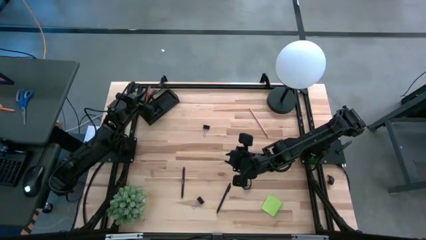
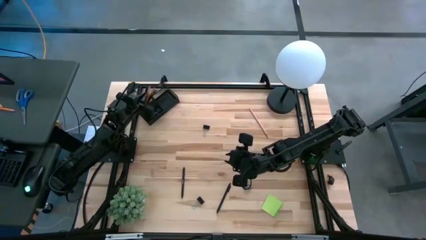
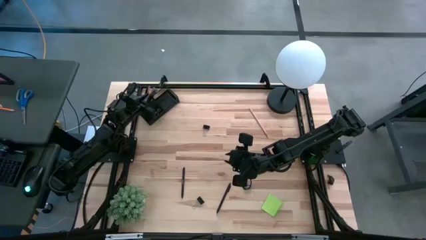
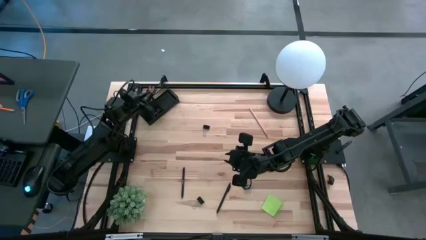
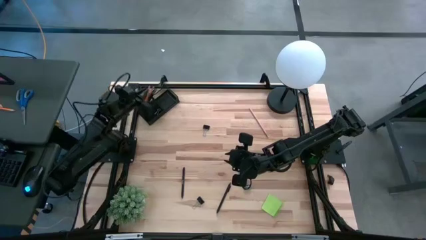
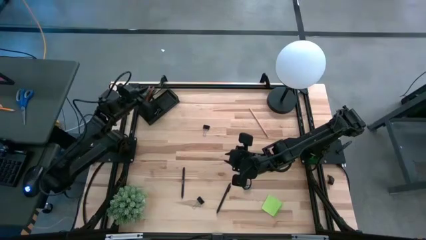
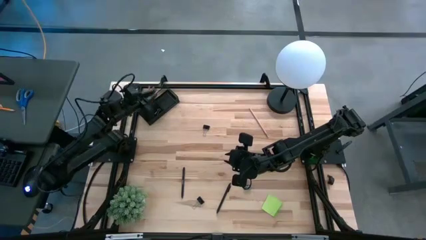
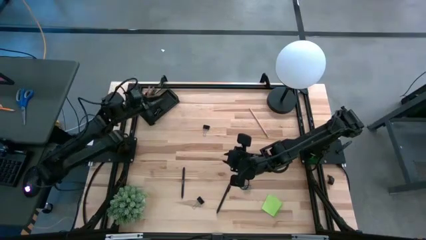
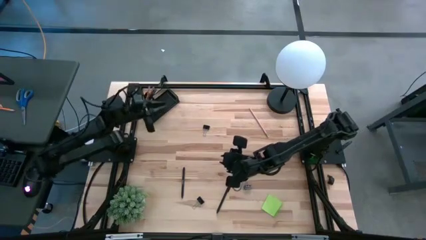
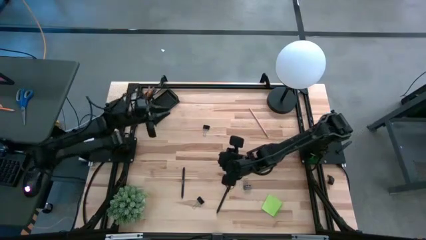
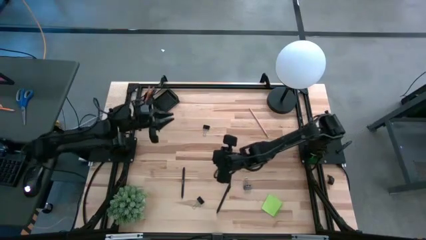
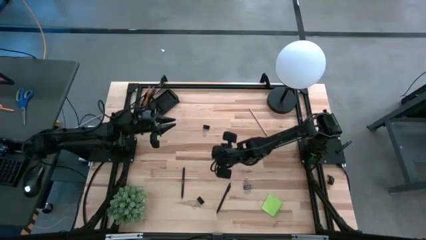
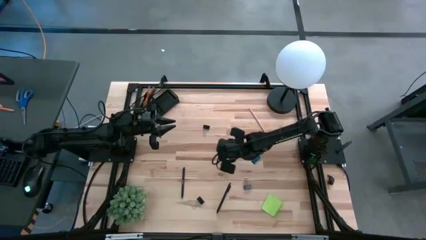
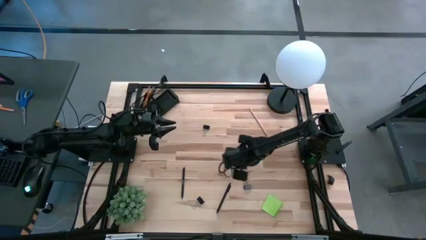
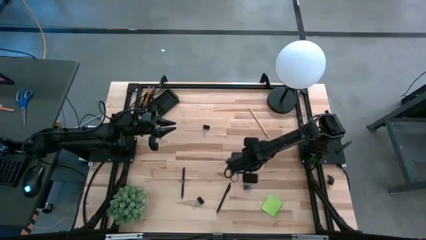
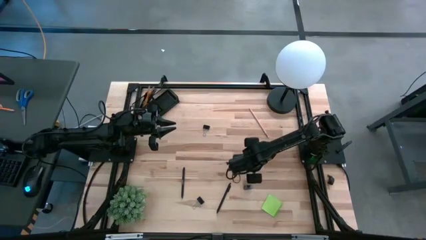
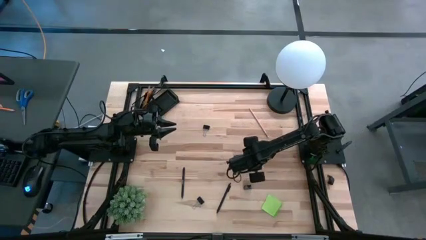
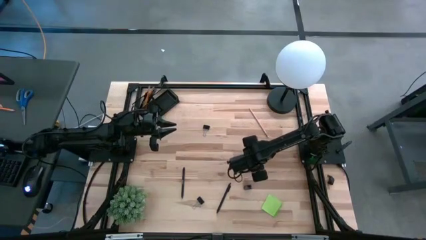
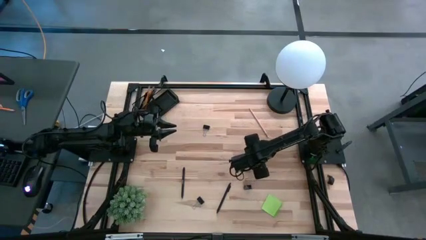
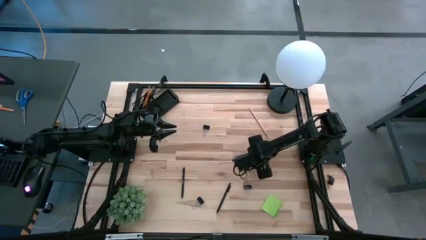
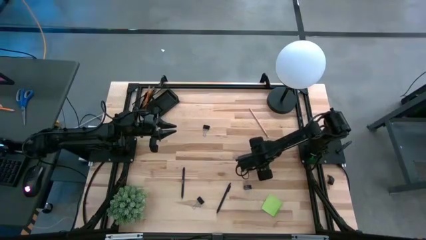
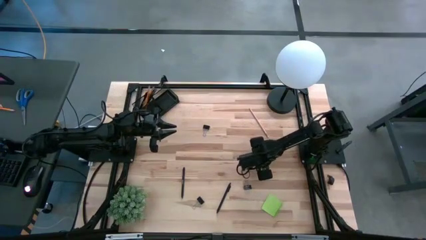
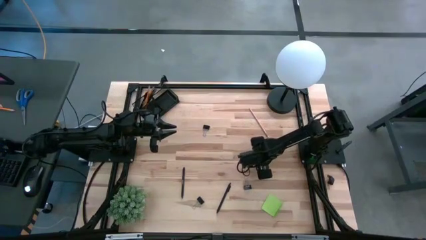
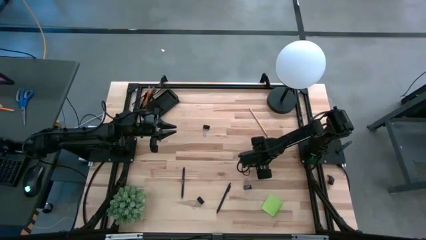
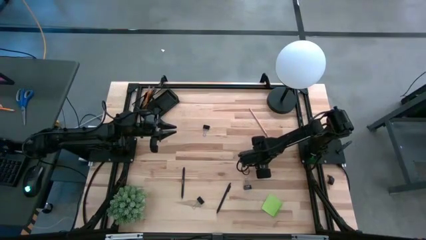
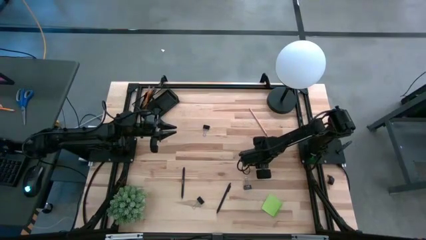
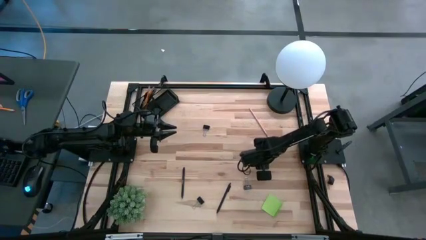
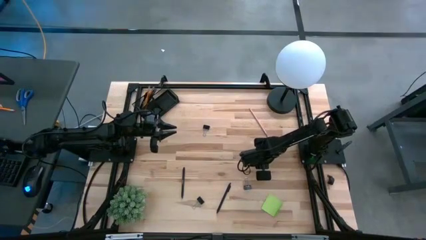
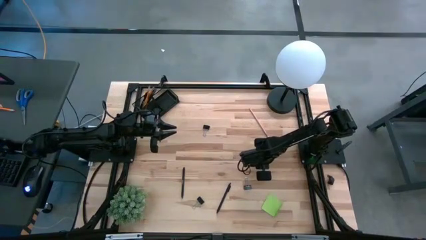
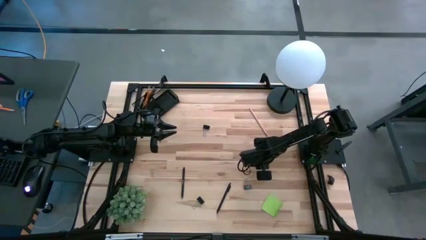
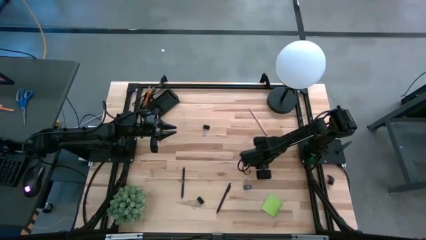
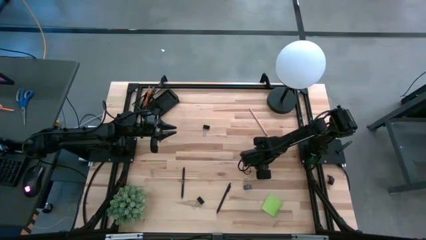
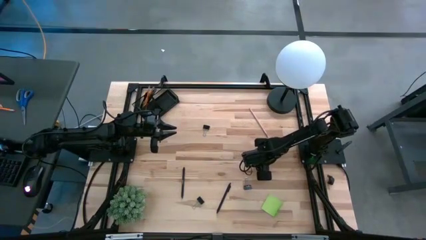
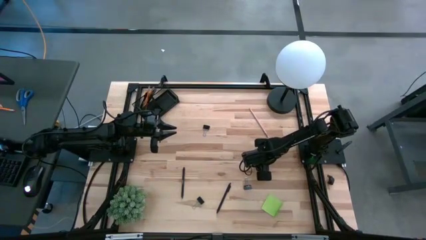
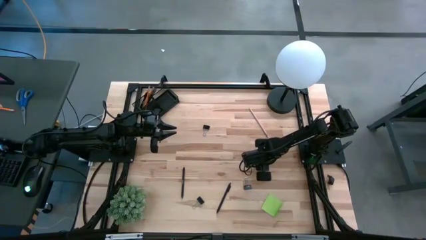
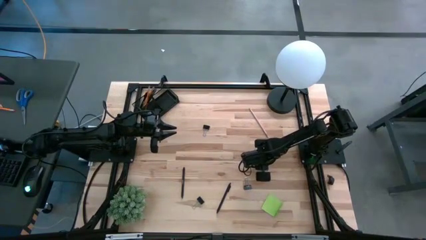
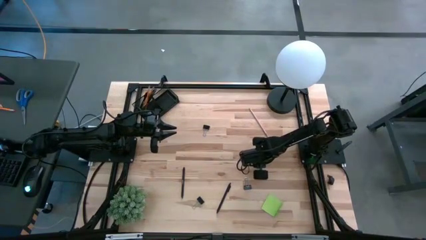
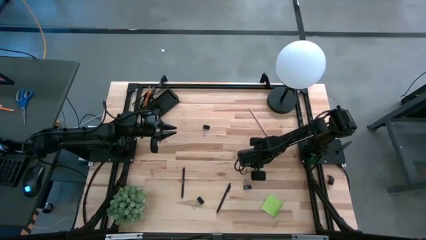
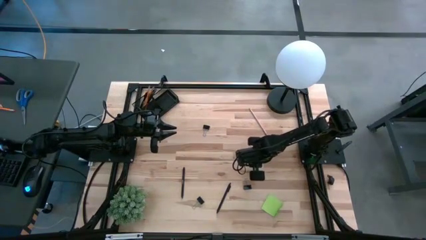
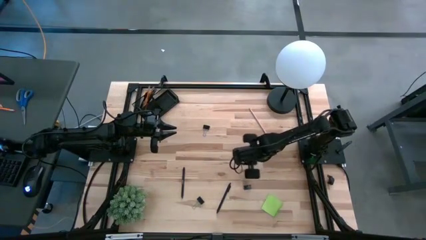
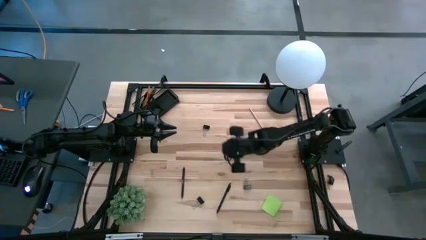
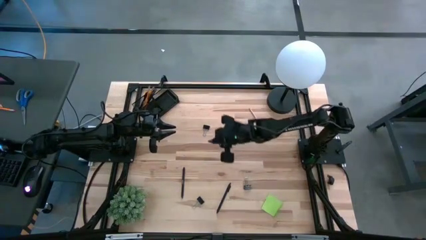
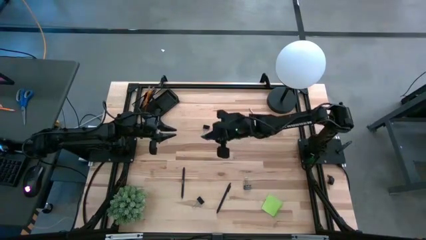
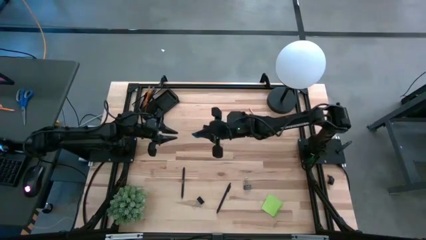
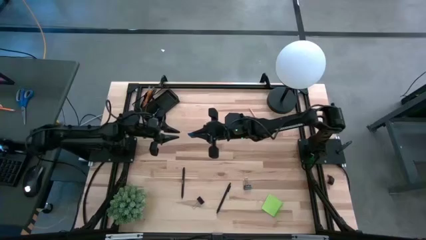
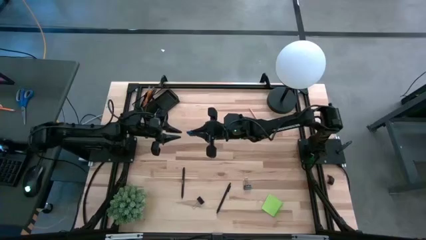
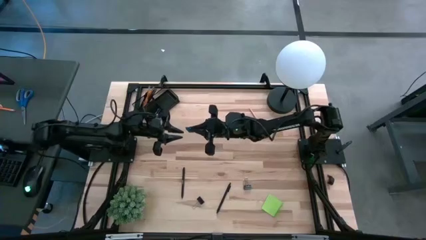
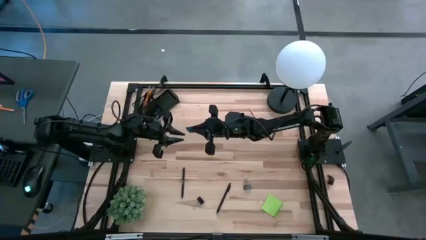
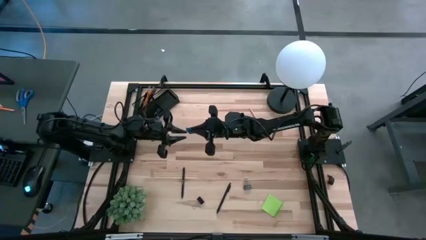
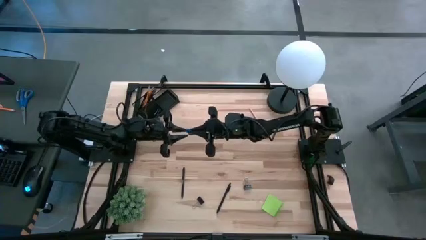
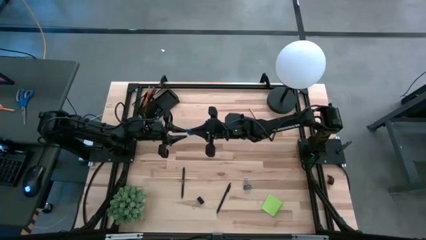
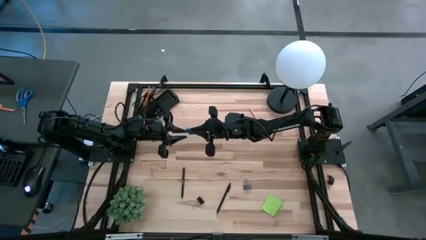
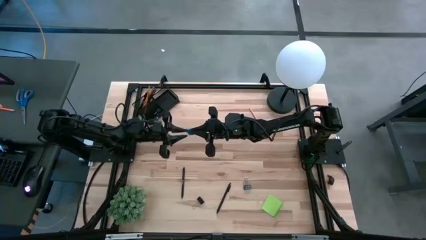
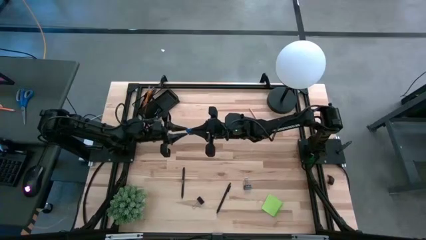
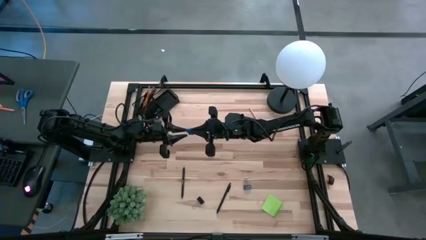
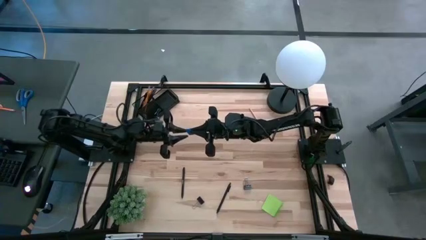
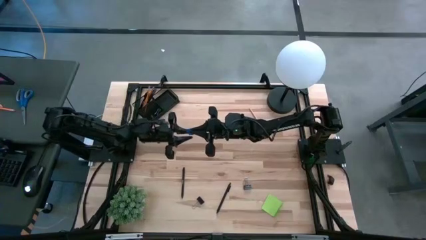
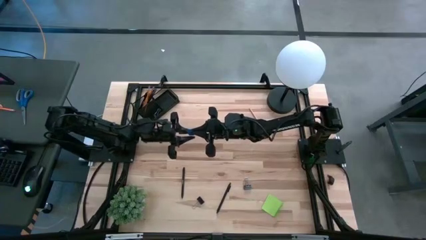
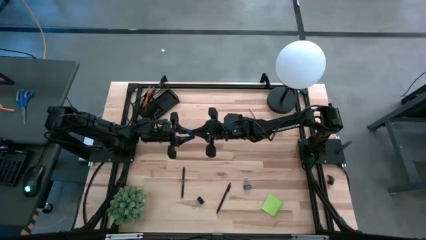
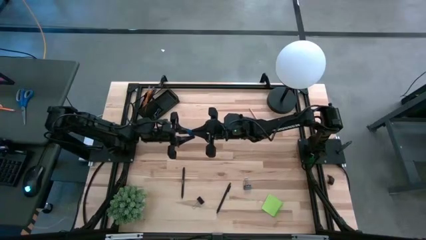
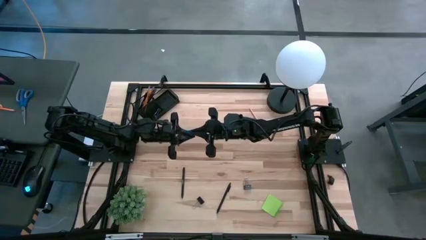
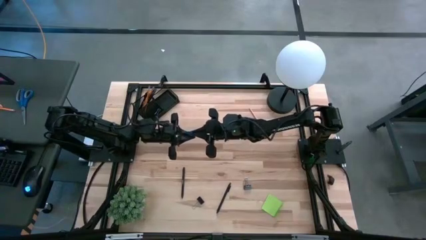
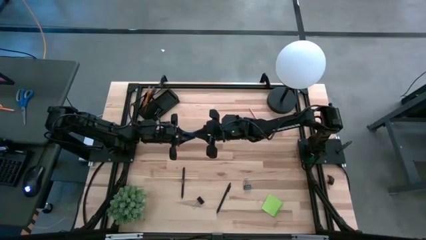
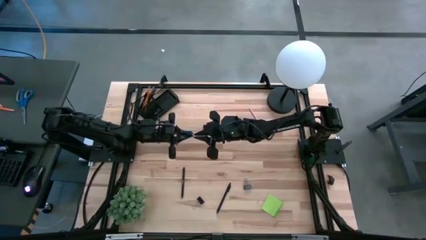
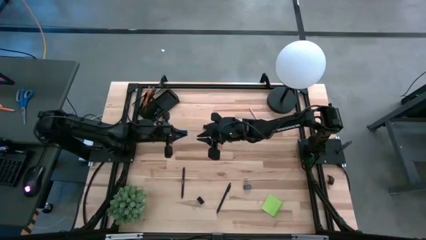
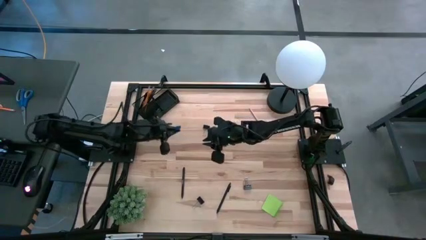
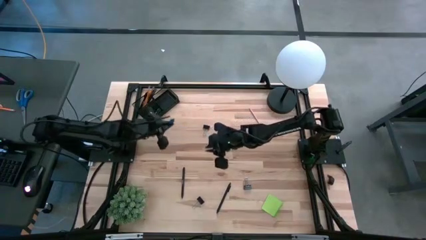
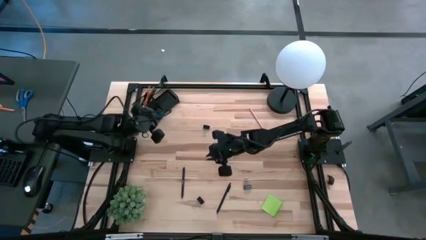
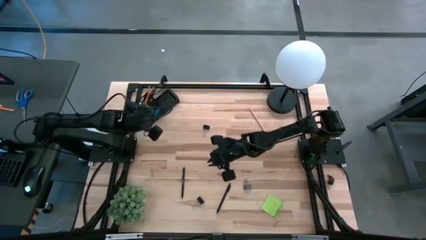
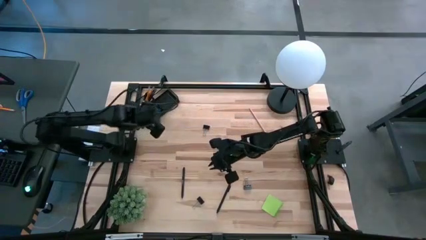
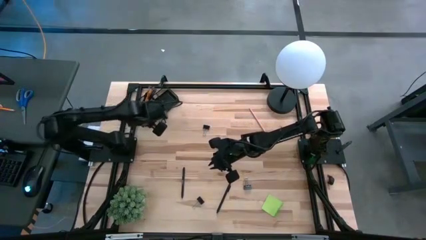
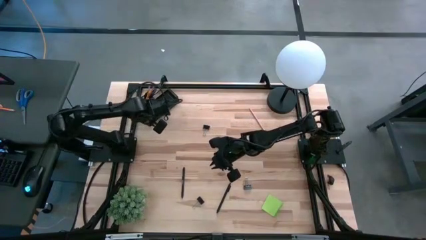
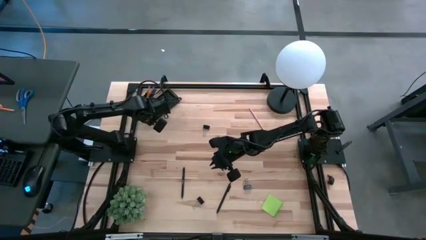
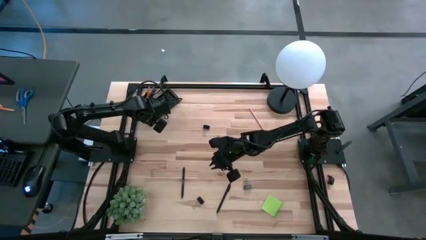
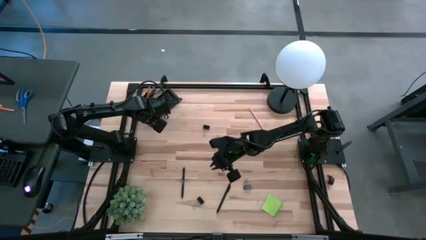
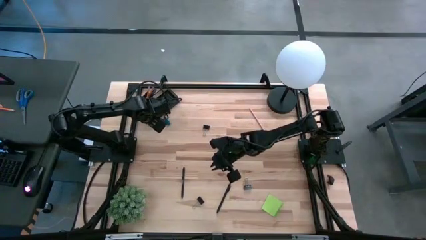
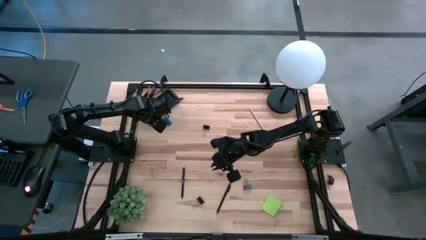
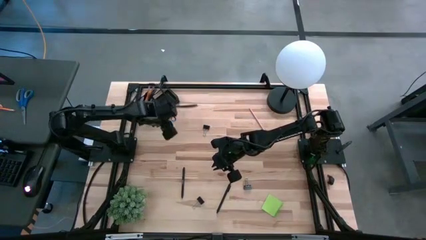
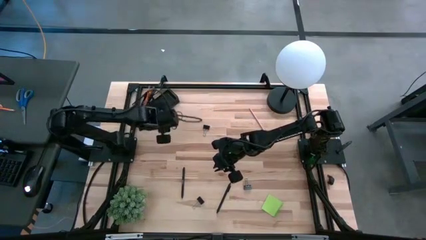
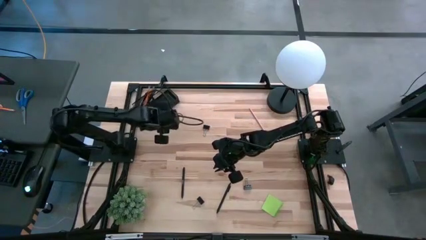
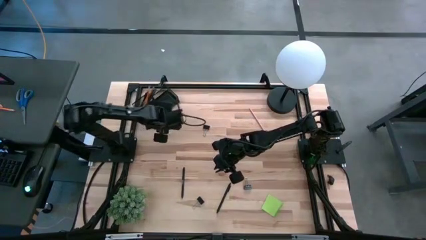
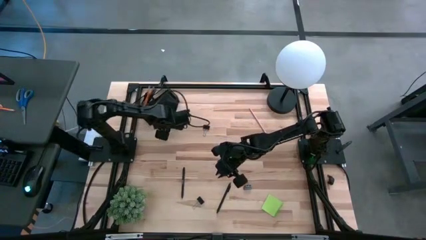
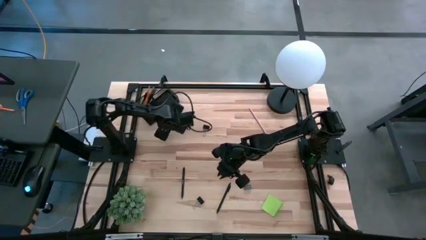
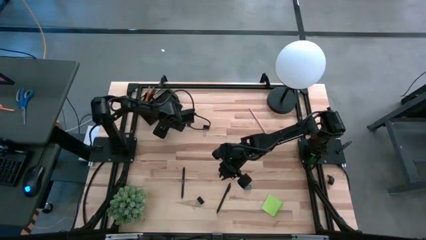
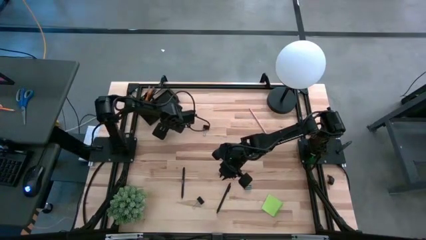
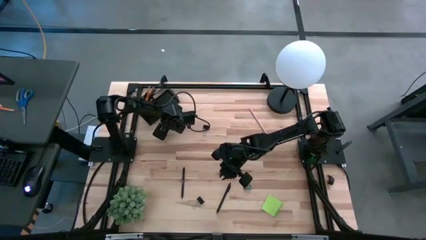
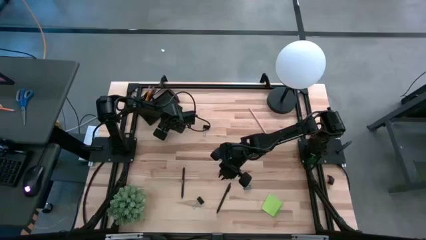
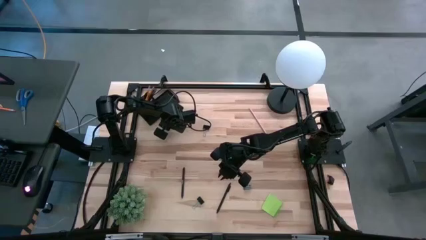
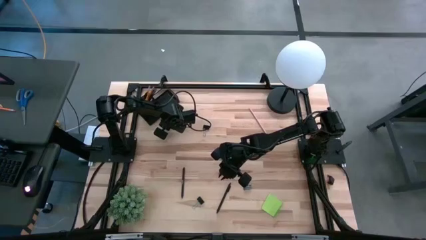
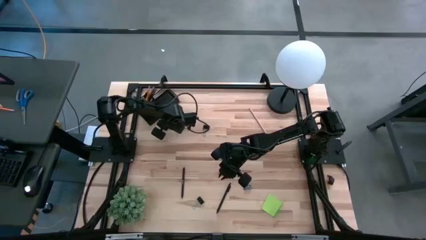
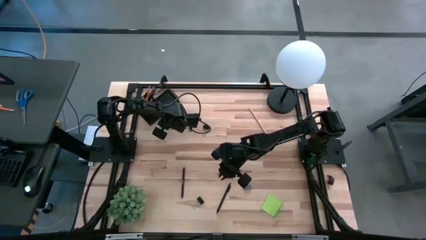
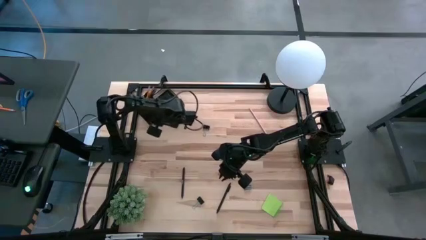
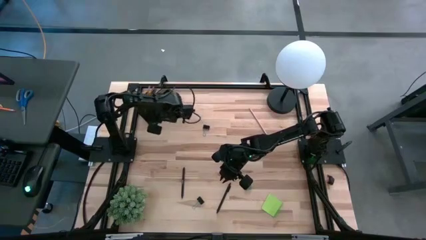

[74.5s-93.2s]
Task: Pick and place office supplies into organizer
Put the blue eraser into the black desk organizer
